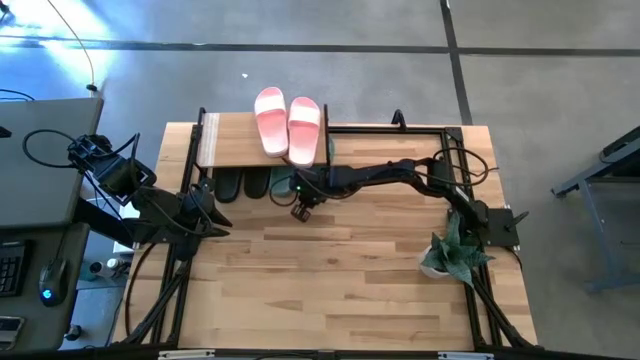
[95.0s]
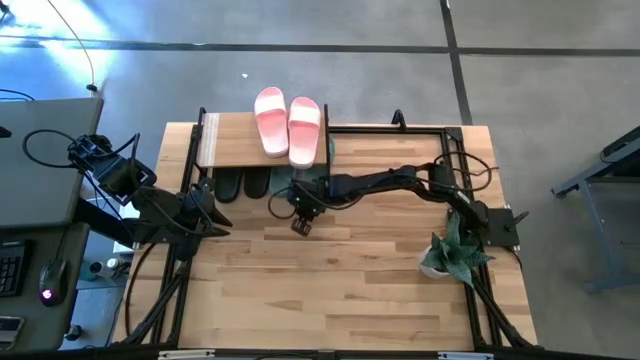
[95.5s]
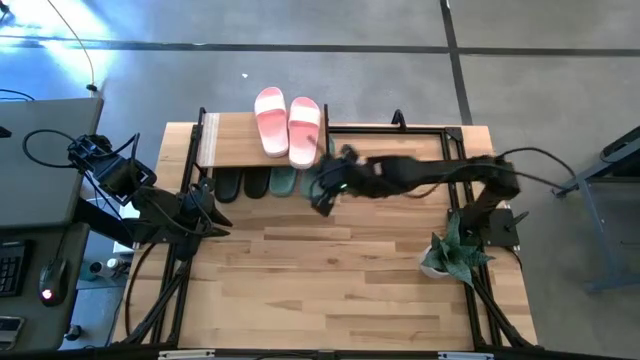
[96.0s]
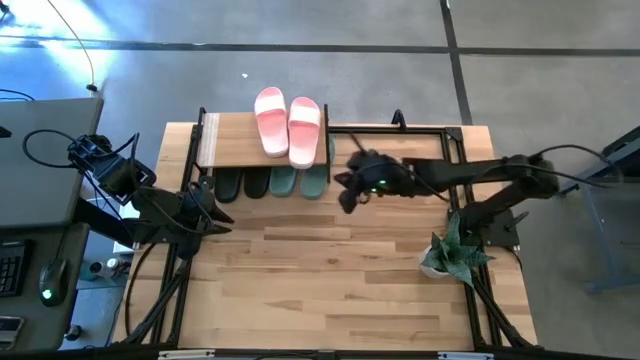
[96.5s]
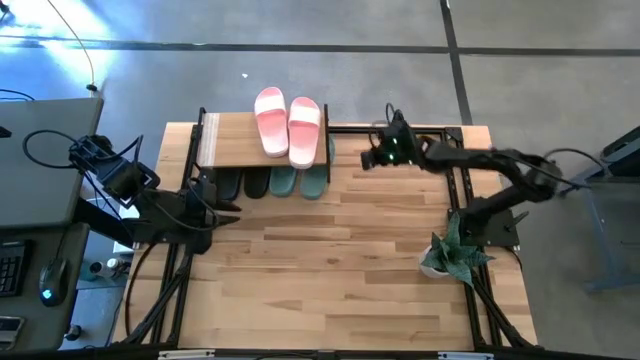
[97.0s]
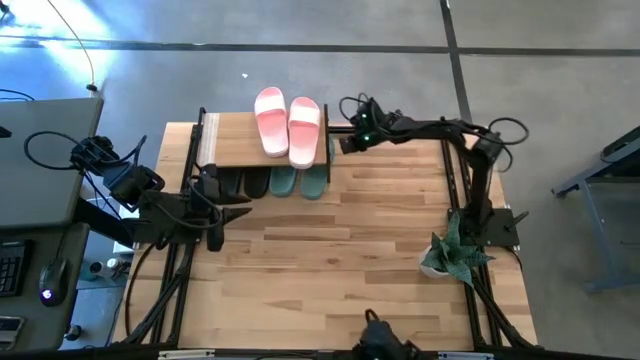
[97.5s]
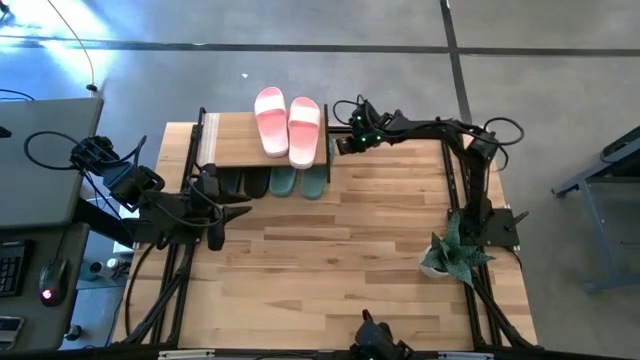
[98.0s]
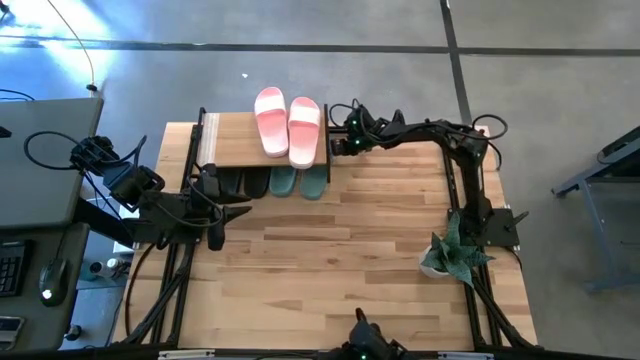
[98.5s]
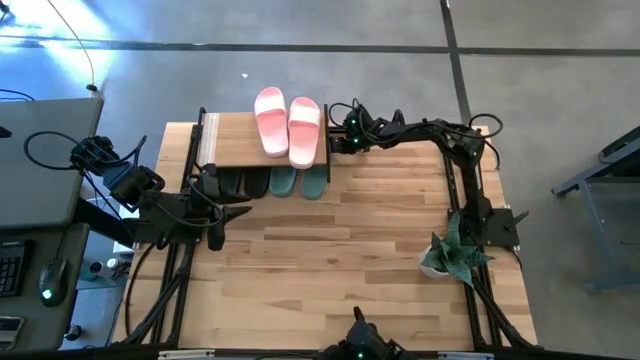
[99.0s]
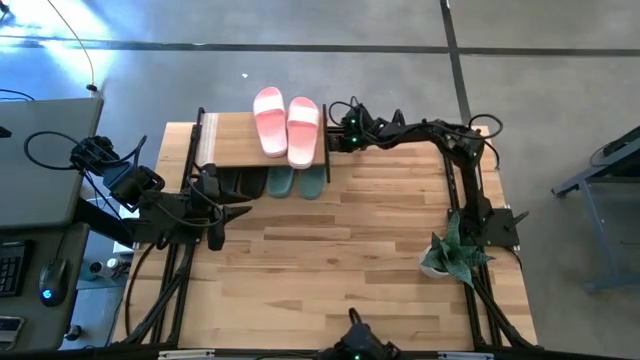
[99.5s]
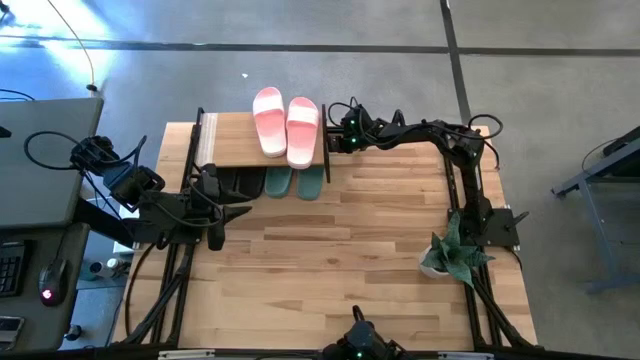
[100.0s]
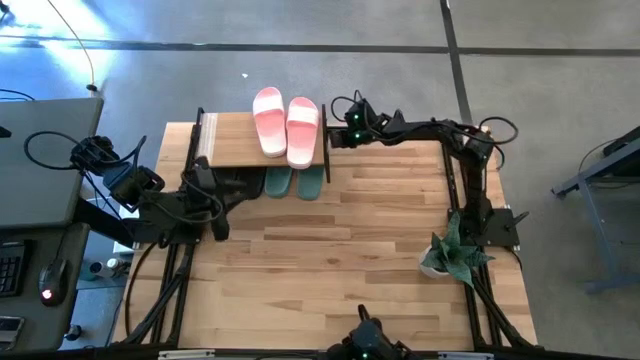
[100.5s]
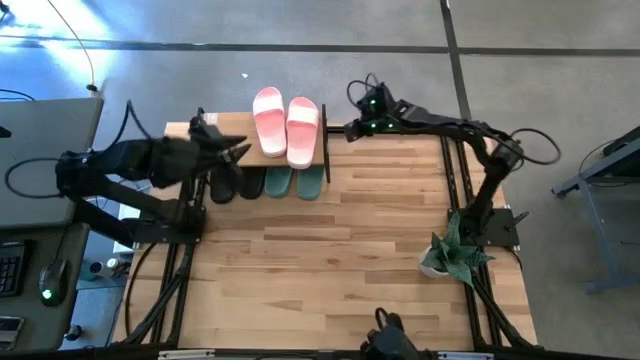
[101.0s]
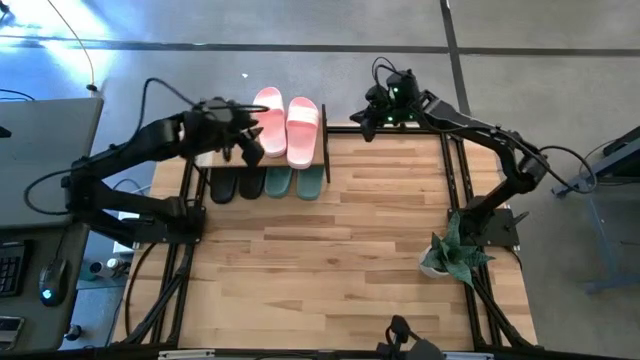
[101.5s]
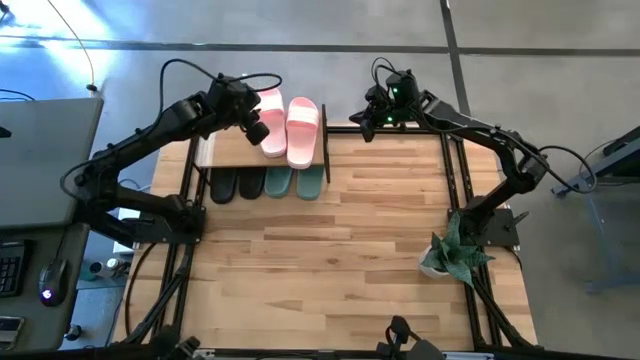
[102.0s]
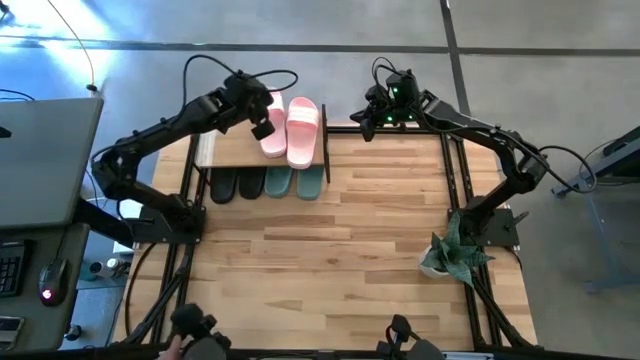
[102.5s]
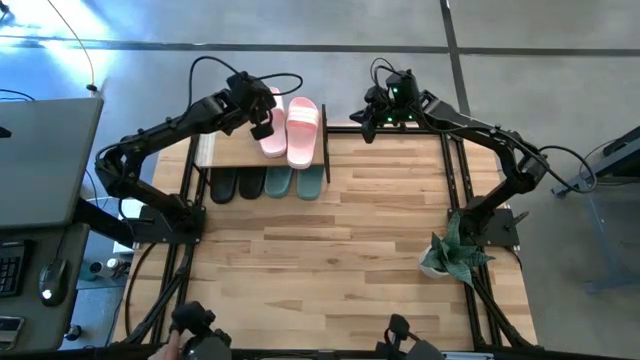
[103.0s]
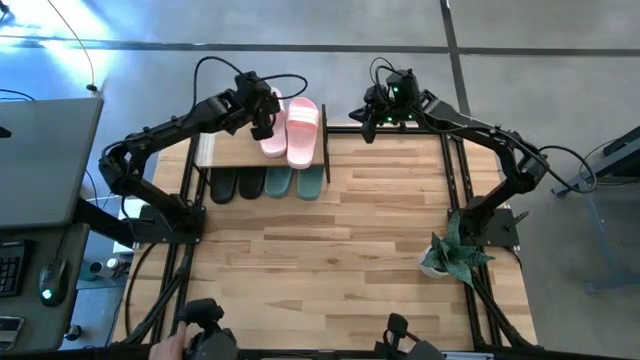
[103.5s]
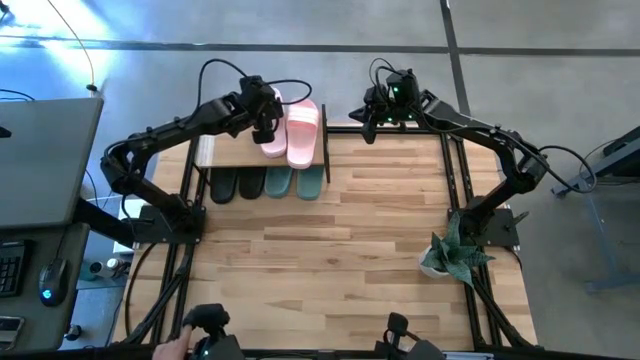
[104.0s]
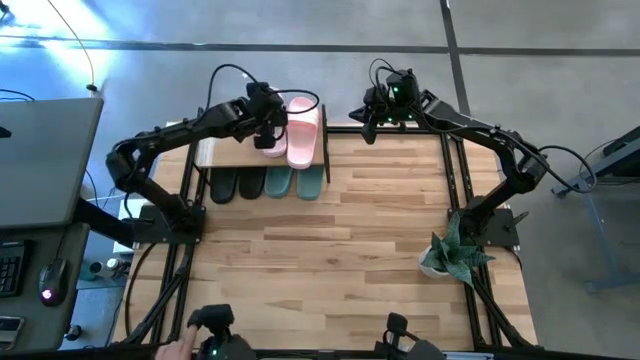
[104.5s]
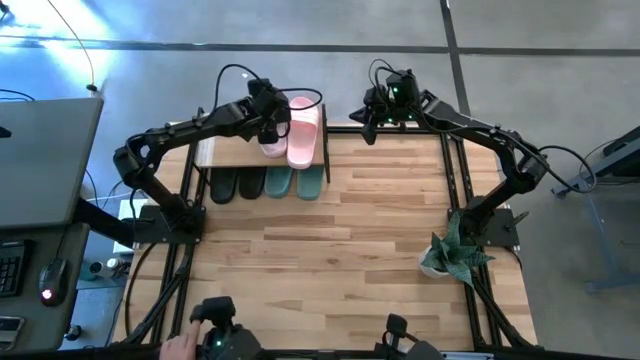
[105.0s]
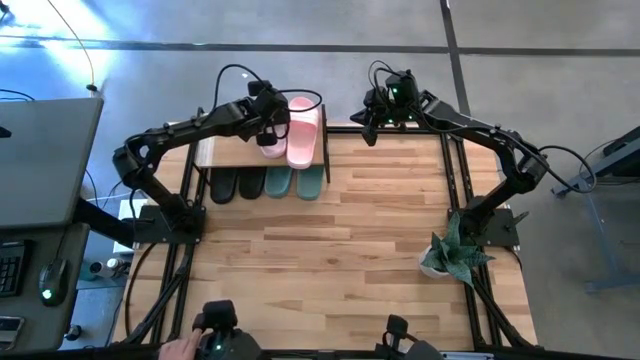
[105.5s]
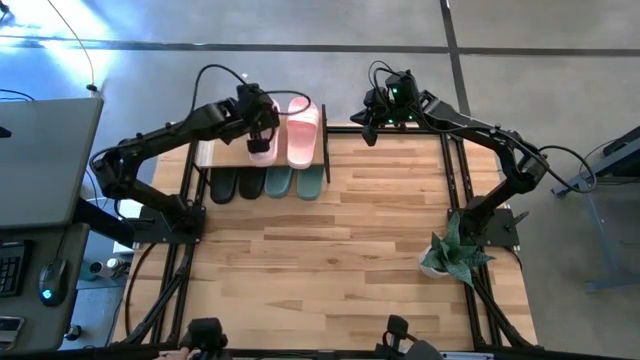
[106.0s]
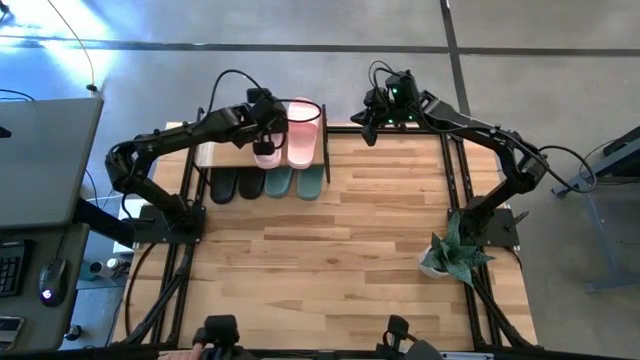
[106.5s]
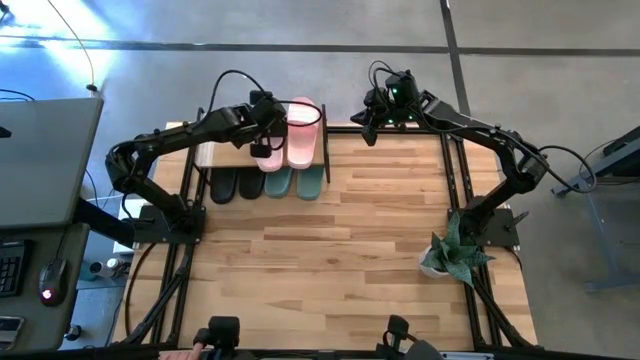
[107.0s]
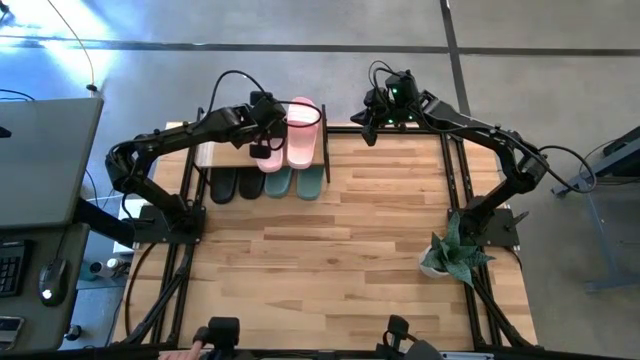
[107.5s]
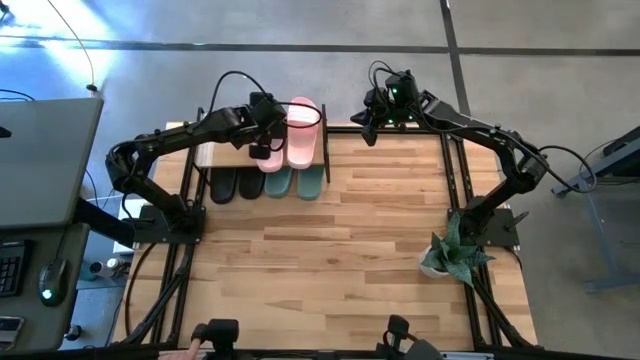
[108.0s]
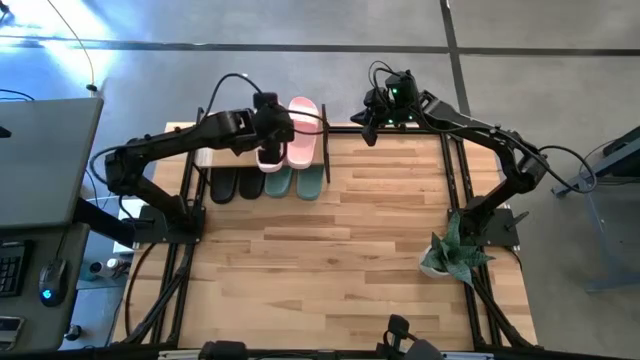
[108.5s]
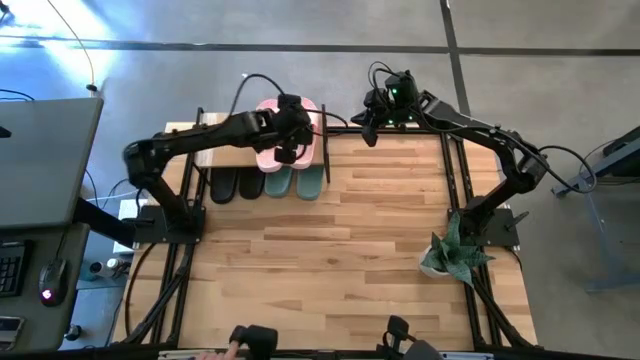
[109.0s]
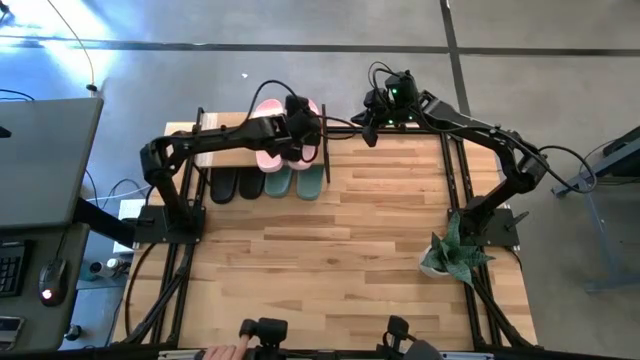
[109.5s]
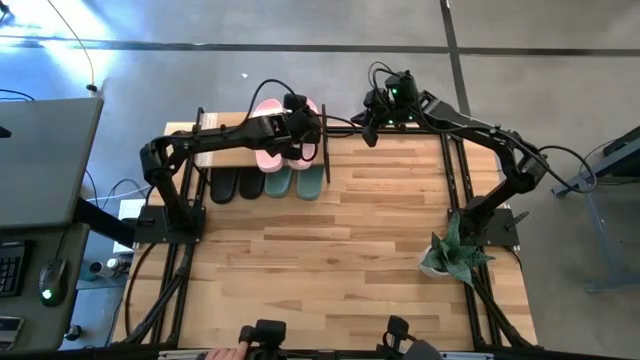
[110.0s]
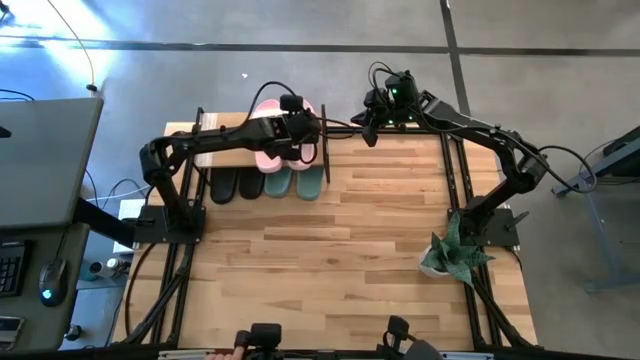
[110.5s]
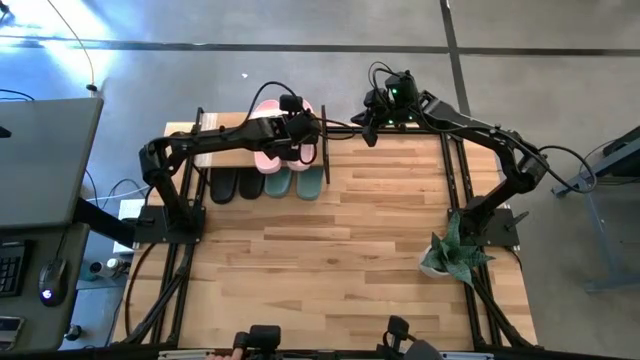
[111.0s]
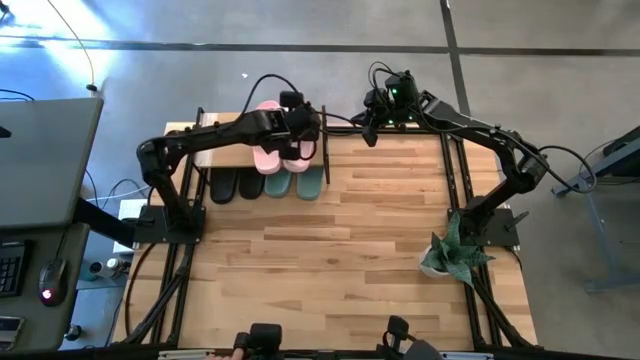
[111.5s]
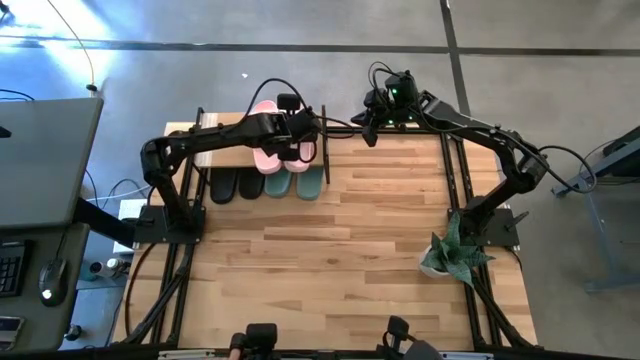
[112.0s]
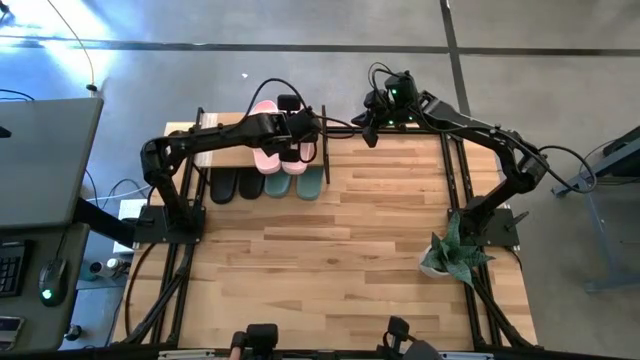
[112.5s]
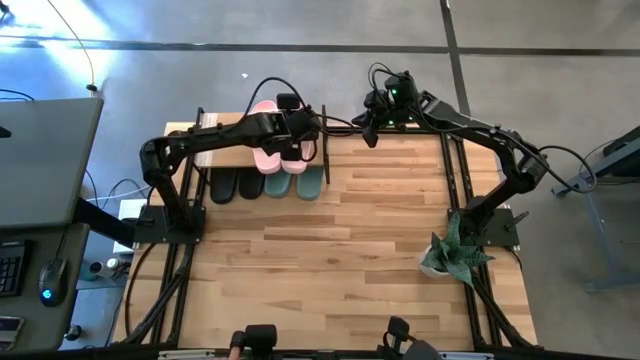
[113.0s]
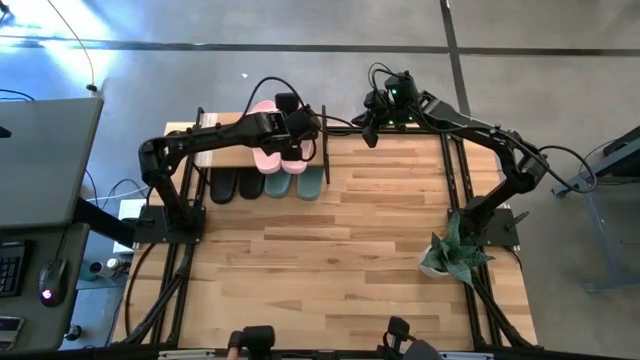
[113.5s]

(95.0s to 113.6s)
Task: Pick and place slides into the shelf
Adjust the slides

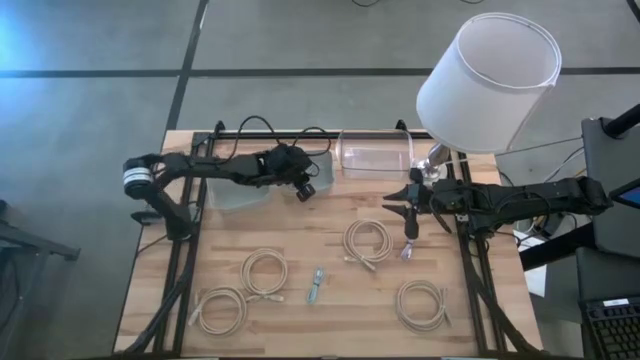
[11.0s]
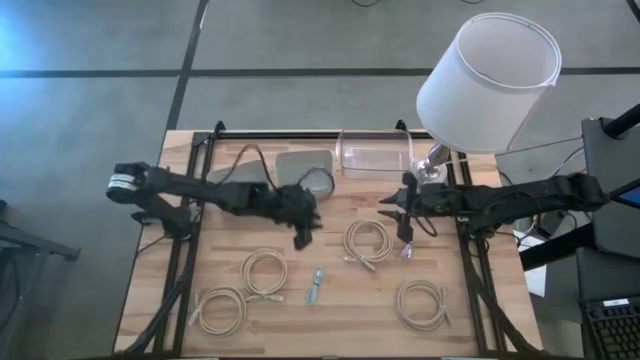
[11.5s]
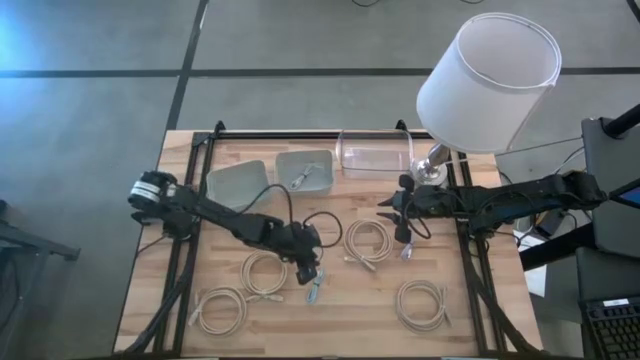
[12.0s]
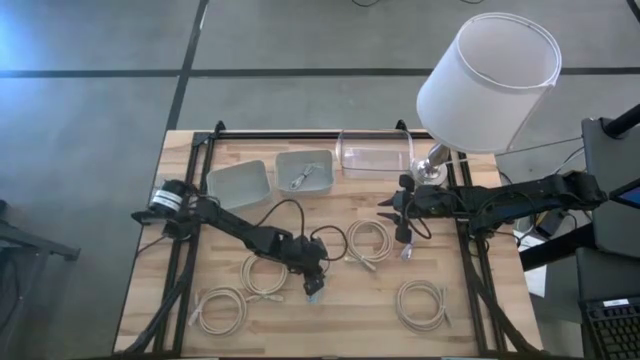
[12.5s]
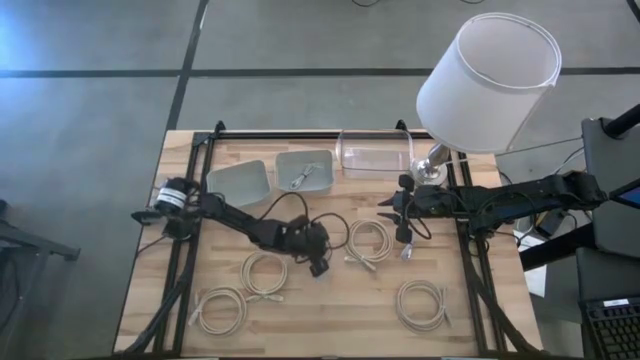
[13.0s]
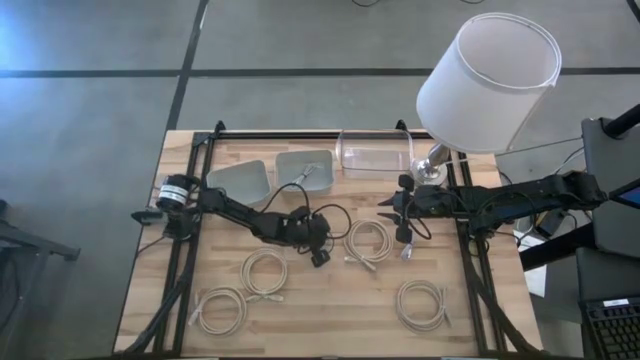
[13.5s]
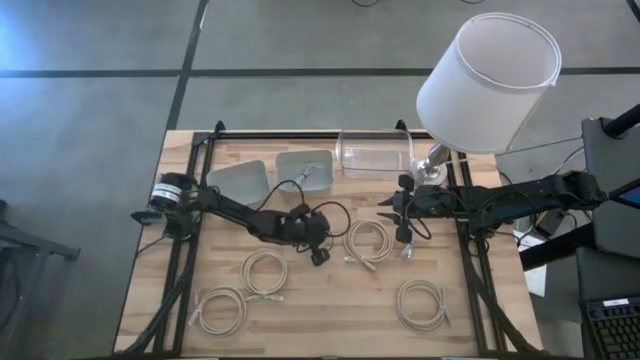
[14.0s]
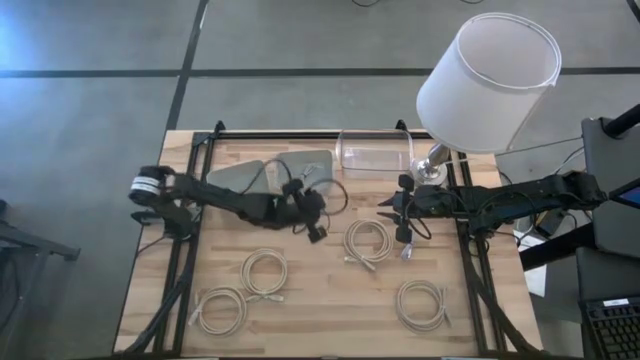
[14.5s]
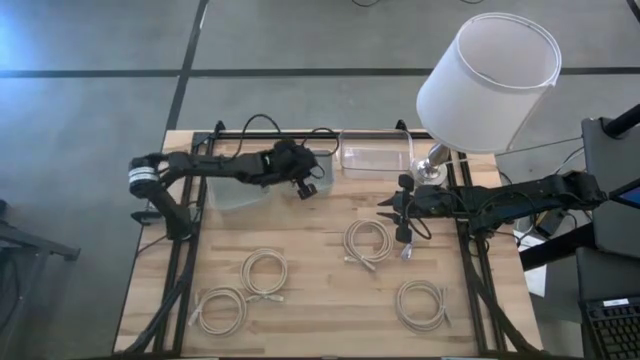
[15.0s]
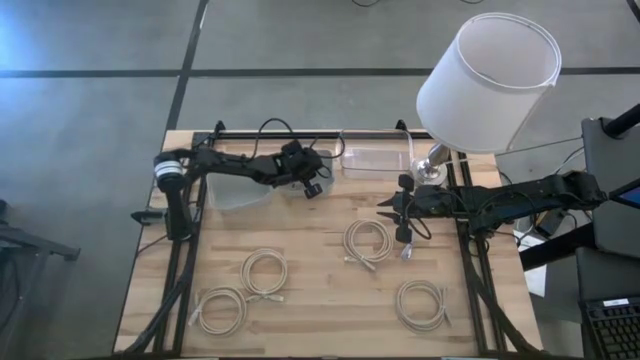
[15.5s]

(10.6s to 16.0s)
Task: Pick & Place USB Port
Put the light blue charger cable into the right gray bin
